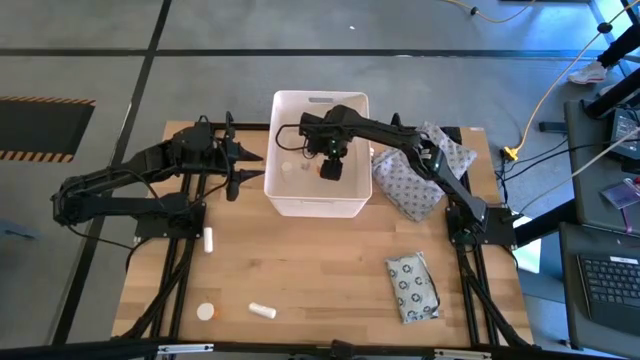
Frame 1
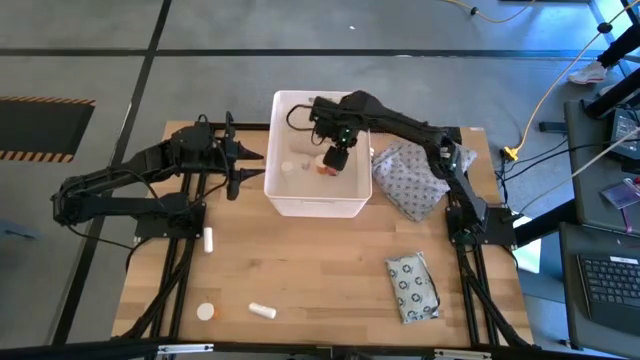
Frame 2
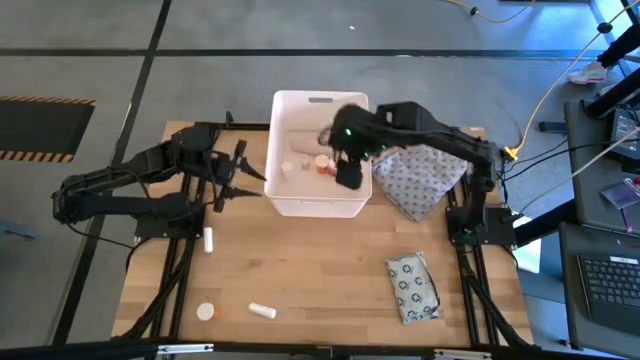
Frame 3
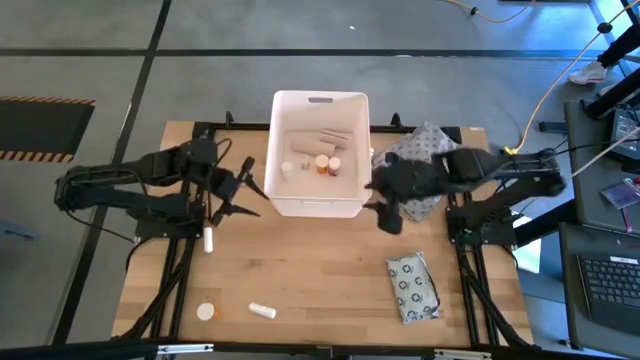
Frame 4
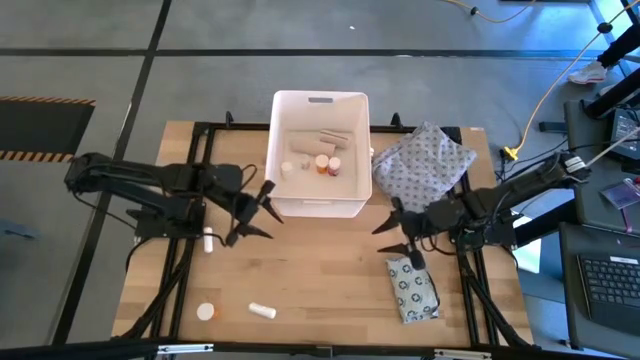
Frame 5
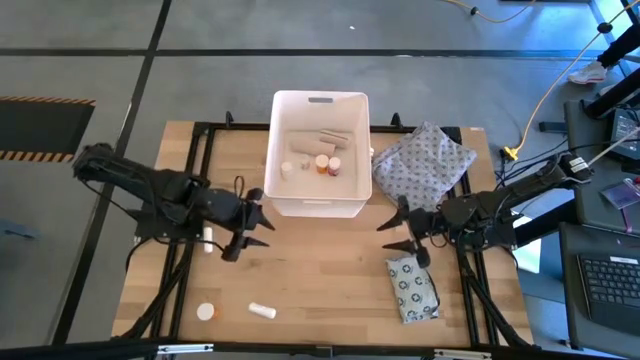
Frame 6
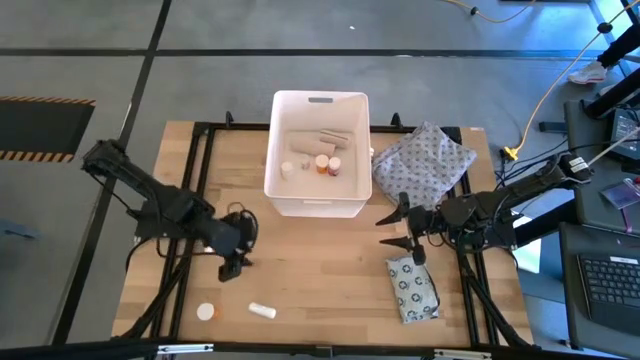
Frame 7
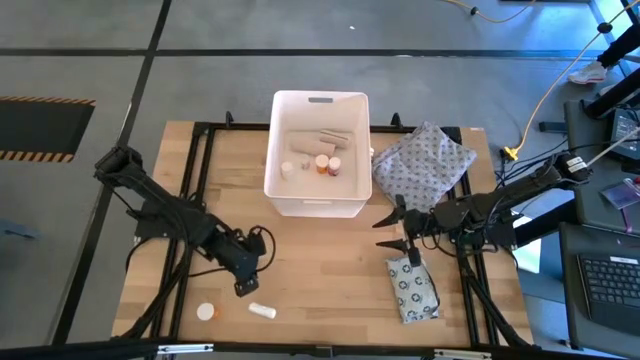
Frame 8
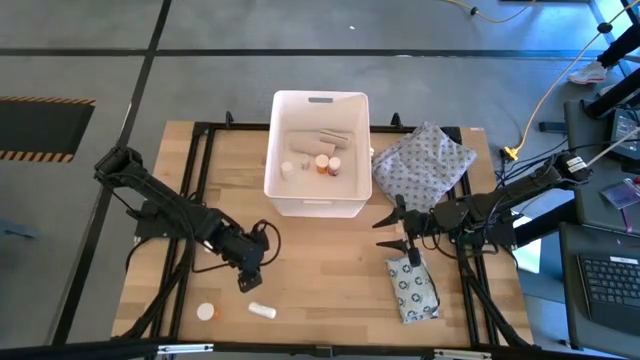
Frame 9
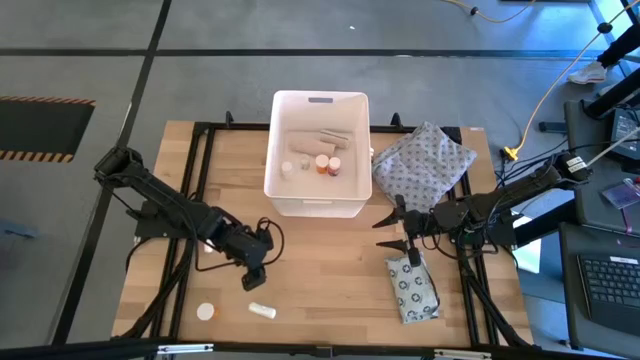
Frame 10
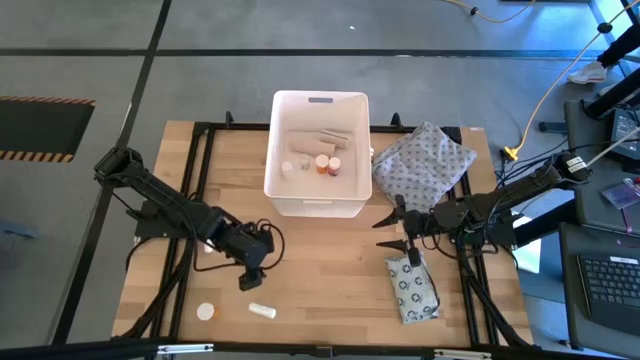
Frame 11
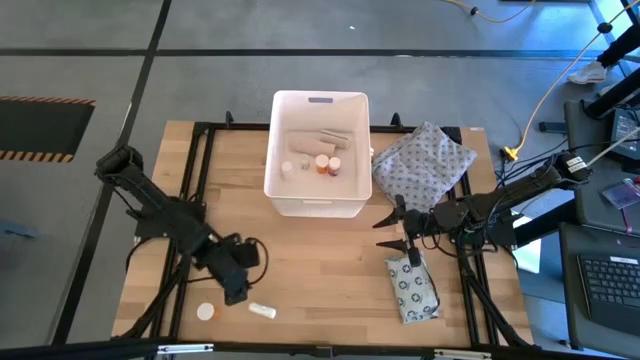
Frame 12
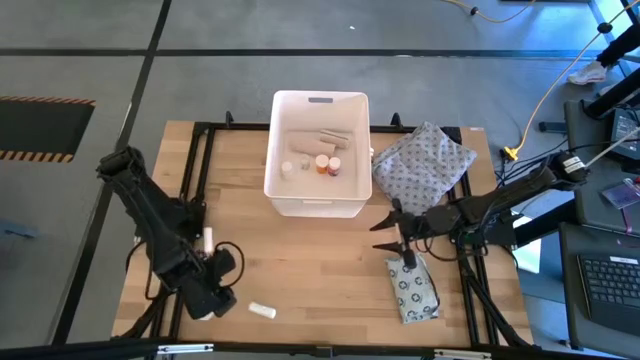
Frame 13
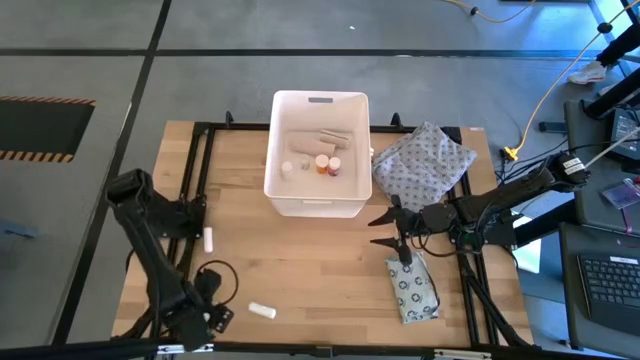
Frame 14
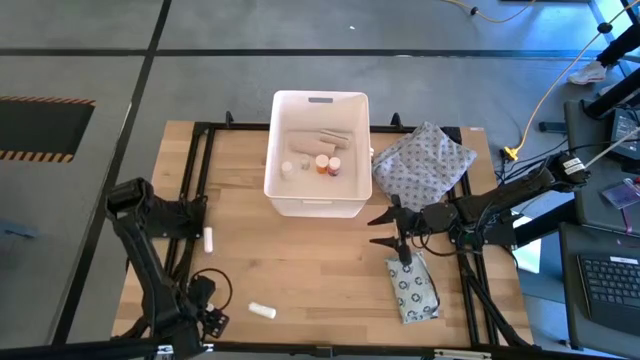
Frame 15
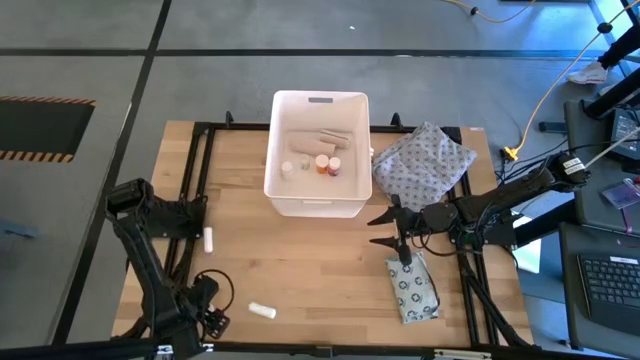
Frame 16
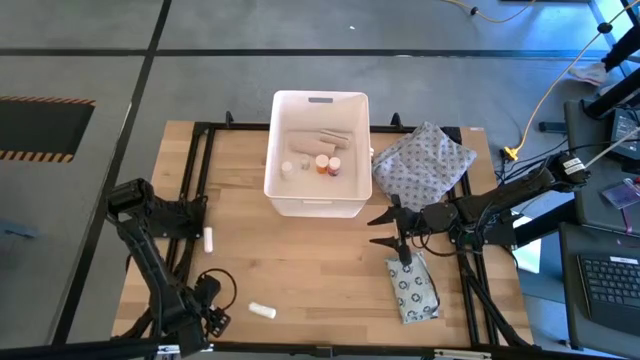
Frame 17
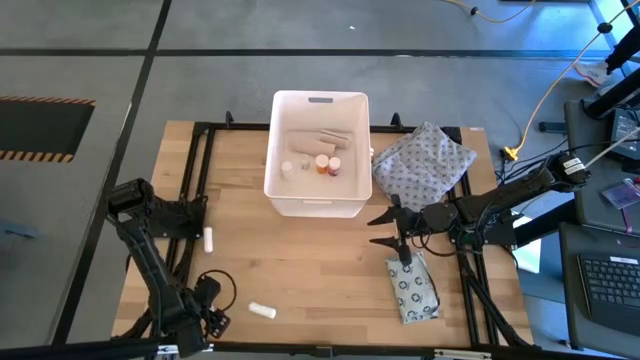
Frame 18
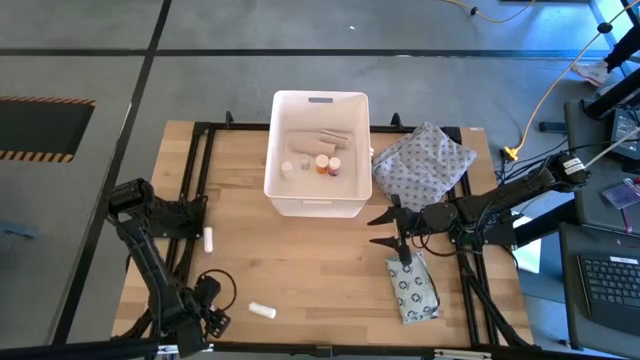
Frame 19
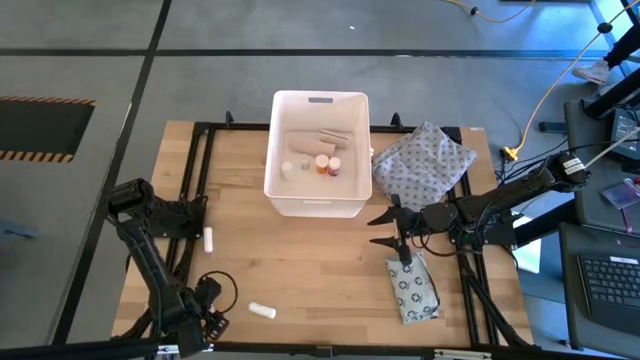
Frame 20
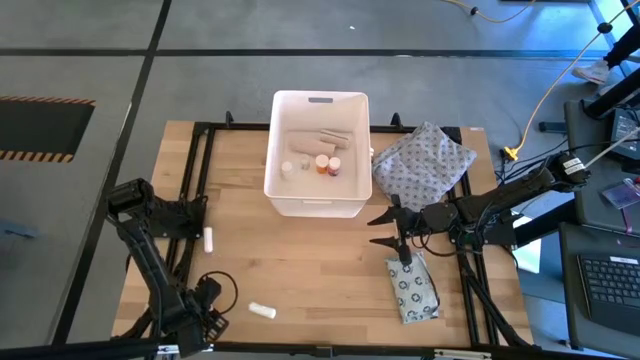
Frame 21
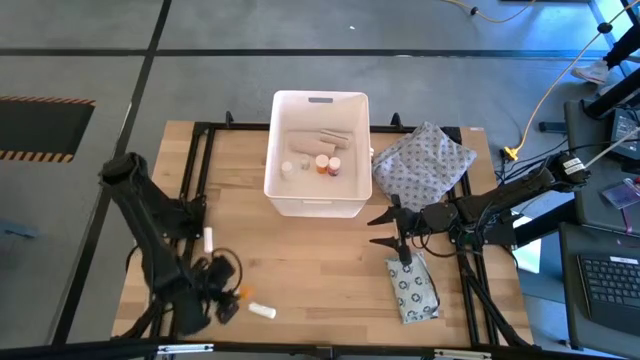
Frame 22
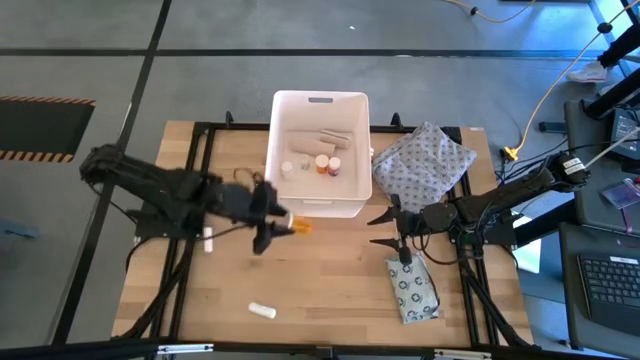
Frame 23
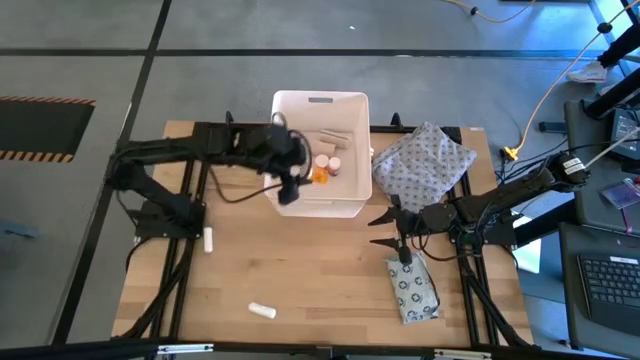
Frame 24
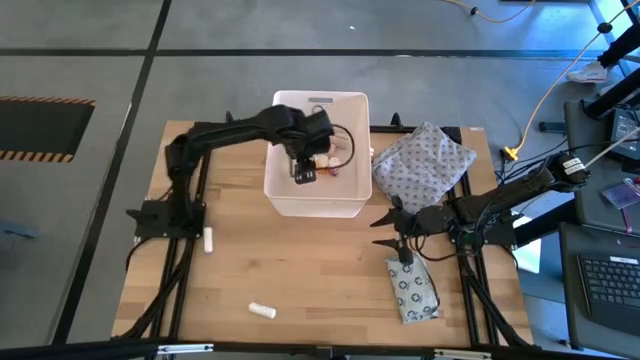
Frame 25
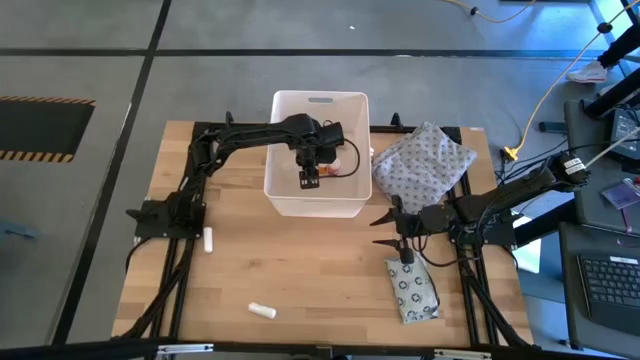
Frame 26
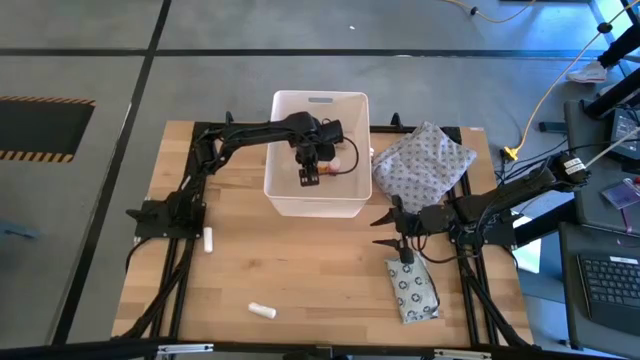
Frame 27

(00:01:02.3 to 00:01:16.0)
Task: Pick & place medical supplies in basket/bin
Put the orange pill bottle into the white bin

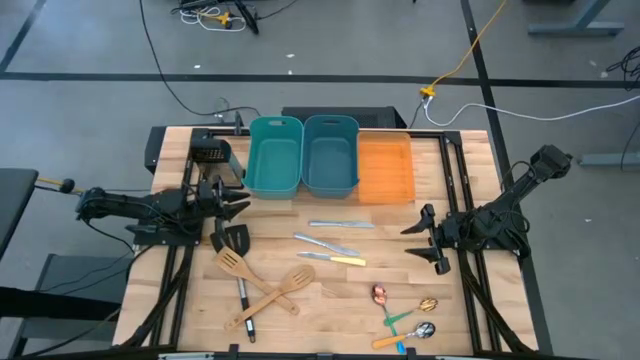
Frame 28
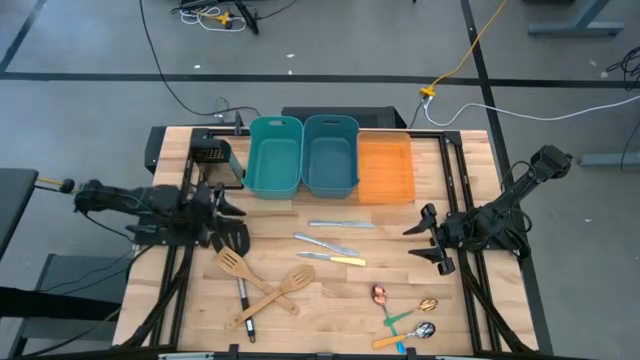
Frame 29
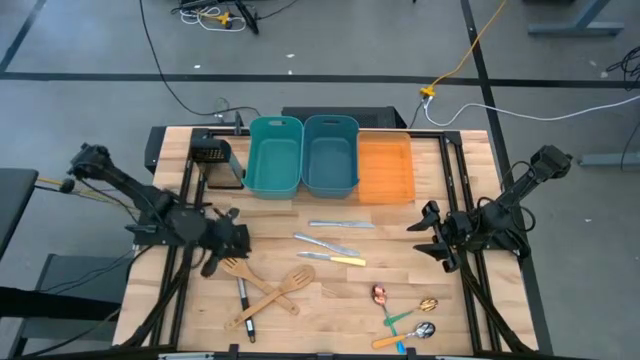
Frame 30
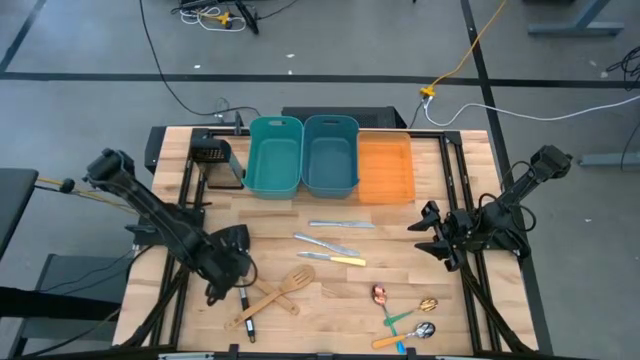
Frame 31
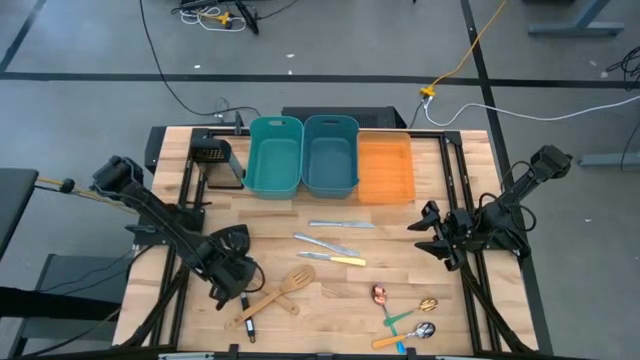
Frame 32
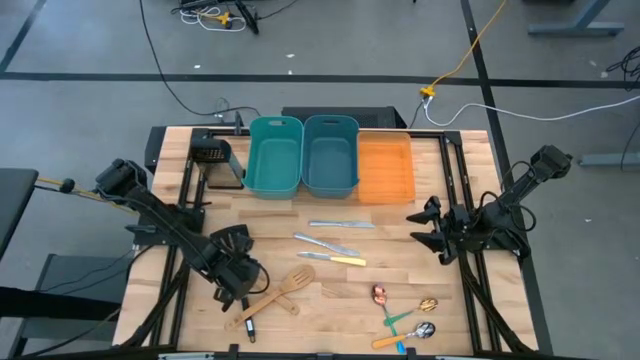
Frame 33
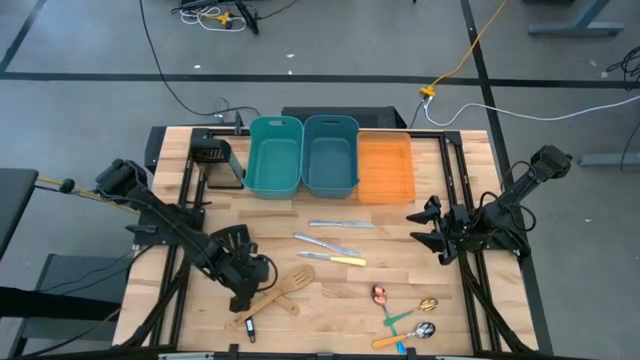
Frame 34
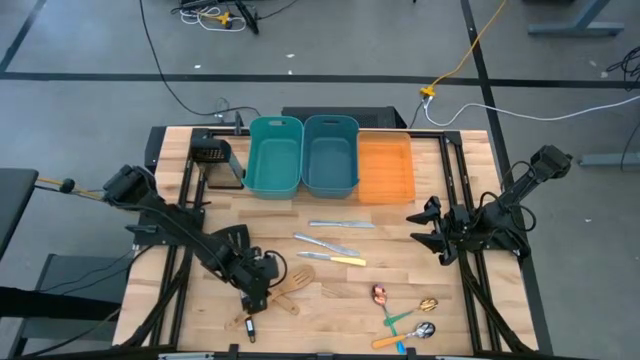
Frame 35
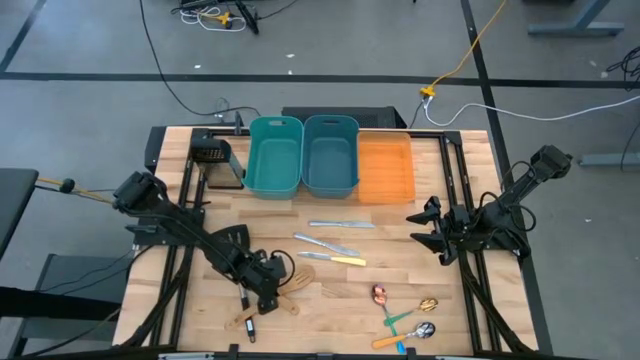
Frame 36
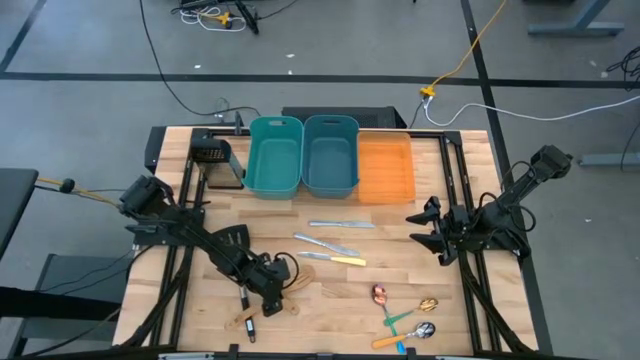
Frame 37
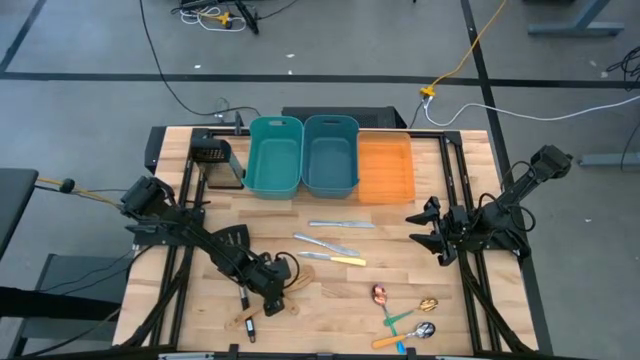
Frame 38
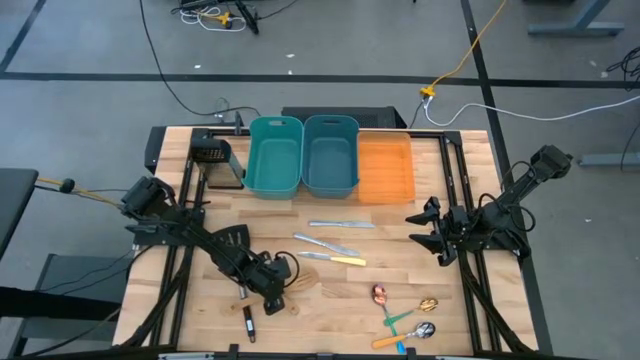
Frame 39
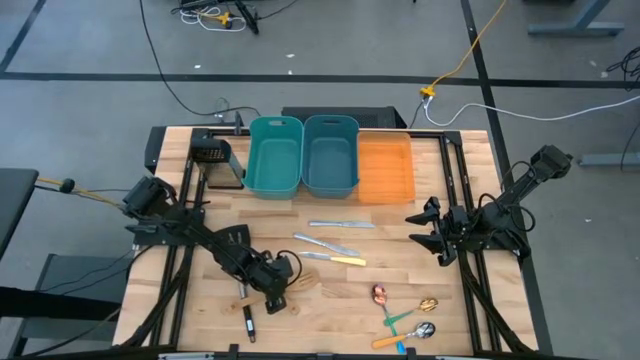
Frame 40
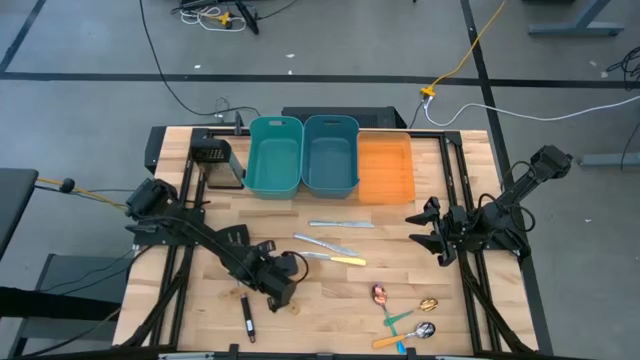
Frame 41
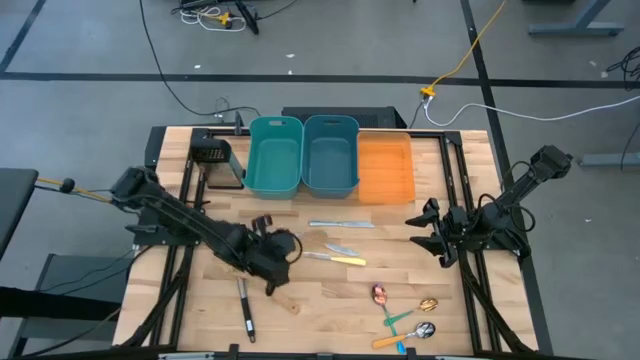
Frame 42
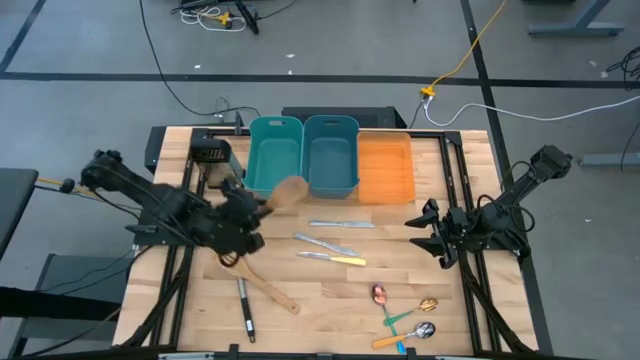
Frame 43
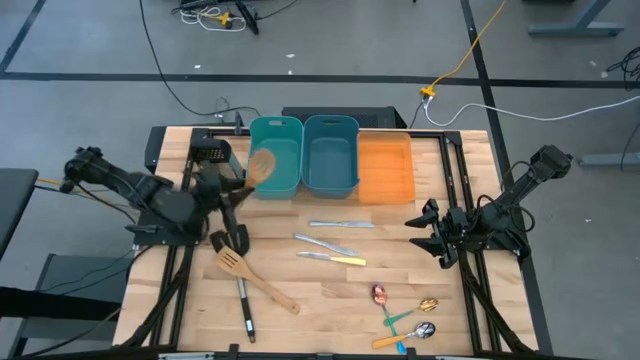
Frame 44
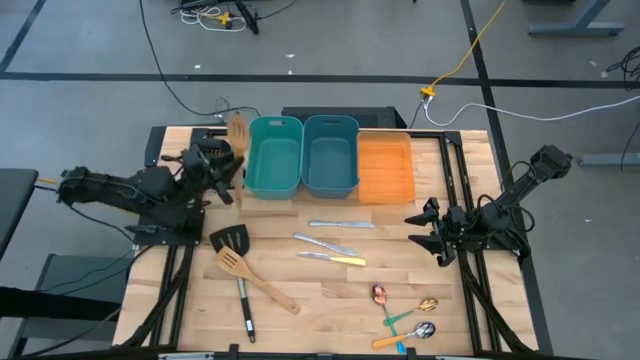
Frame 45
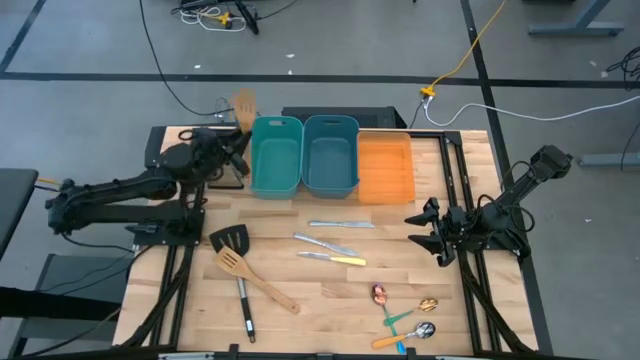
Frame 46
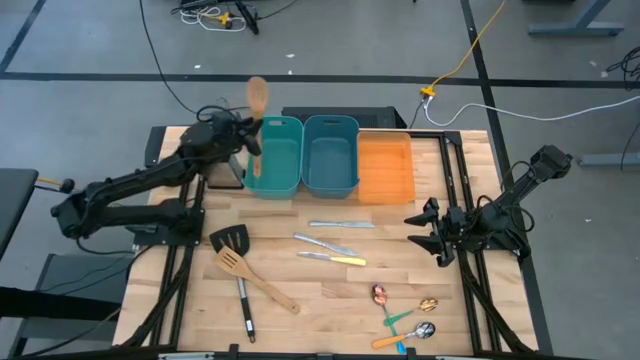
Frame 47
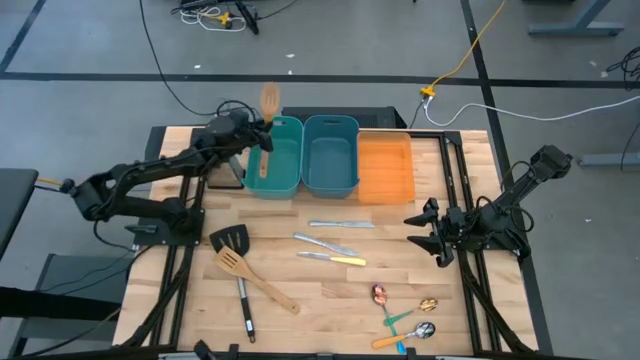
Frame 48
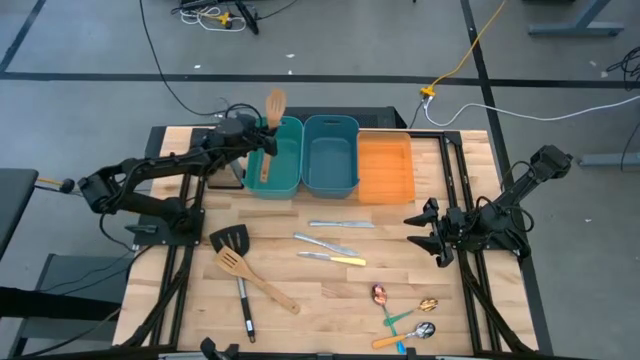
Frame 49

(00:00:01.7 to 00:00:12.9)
Task: Pick & Place Kitchen Items
Put the right wooden spatula into the green bin
